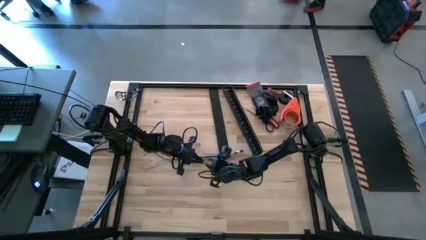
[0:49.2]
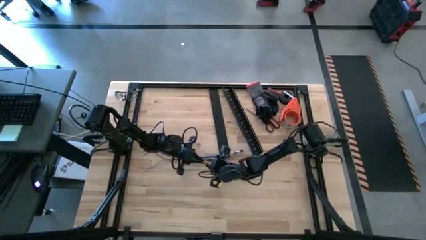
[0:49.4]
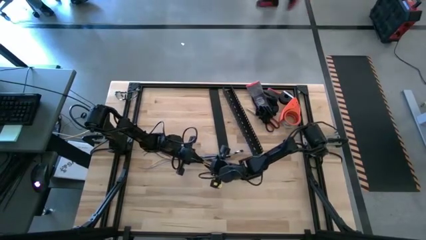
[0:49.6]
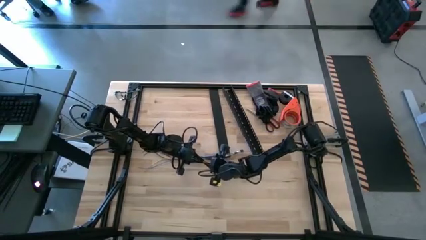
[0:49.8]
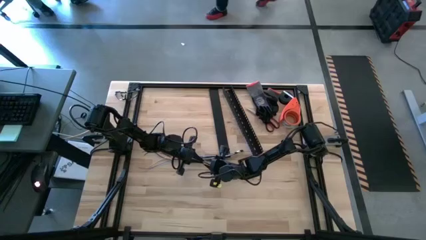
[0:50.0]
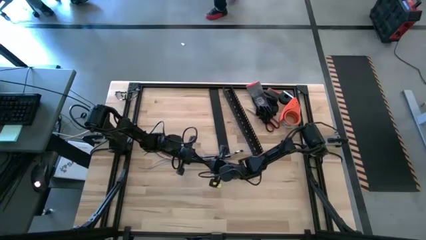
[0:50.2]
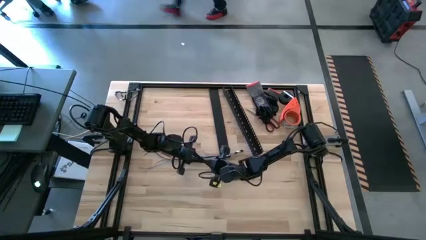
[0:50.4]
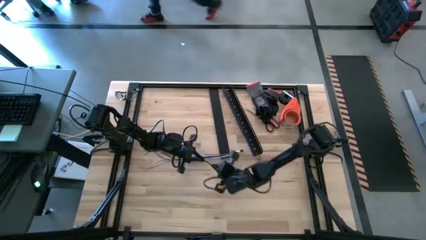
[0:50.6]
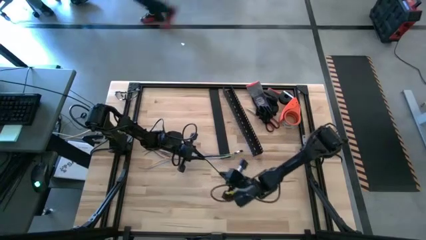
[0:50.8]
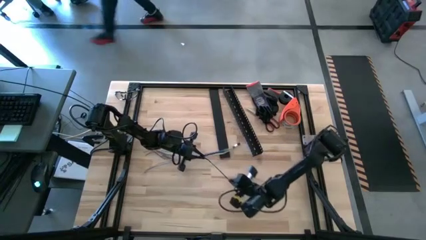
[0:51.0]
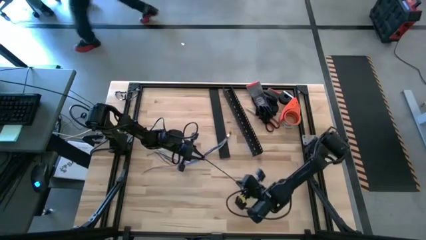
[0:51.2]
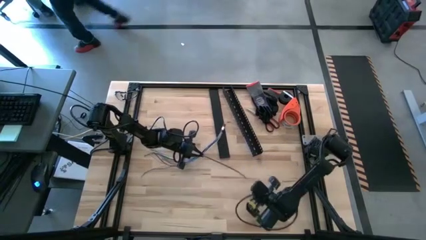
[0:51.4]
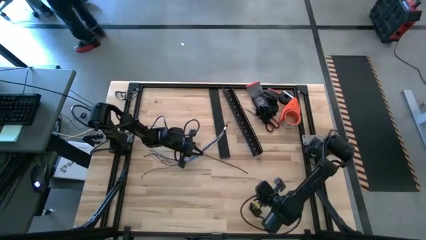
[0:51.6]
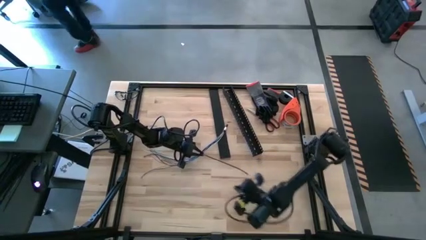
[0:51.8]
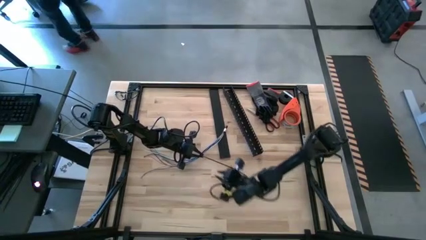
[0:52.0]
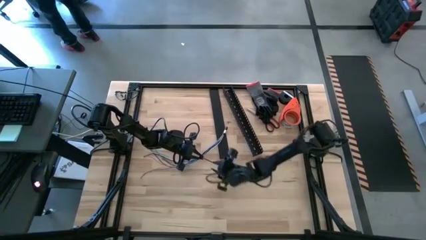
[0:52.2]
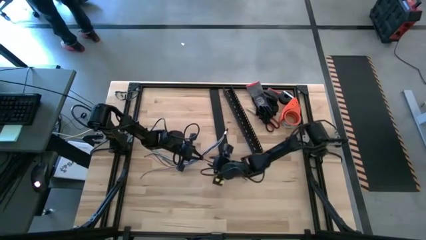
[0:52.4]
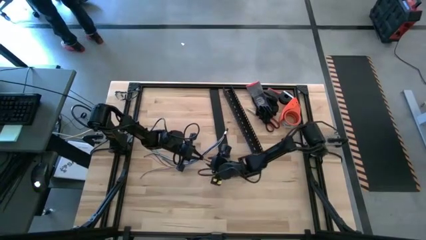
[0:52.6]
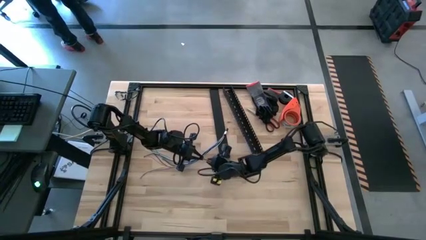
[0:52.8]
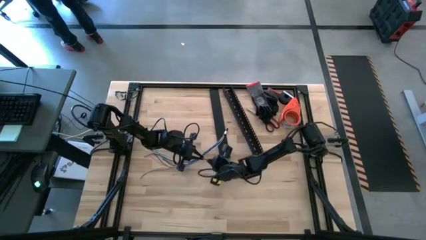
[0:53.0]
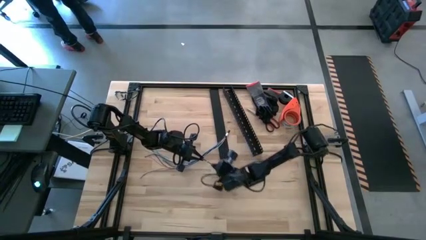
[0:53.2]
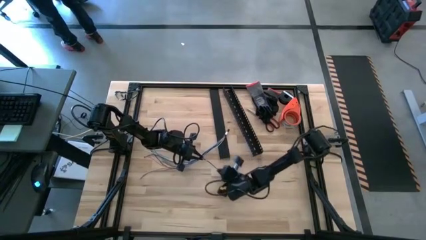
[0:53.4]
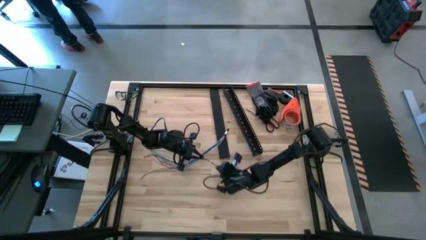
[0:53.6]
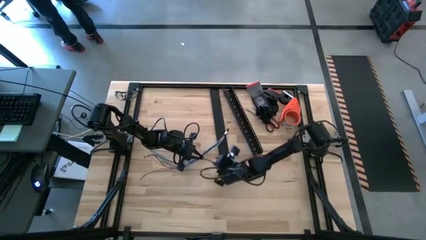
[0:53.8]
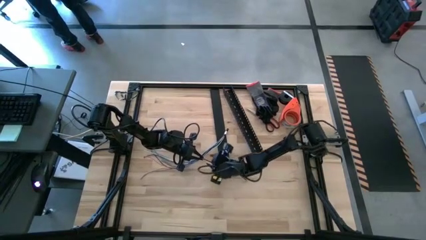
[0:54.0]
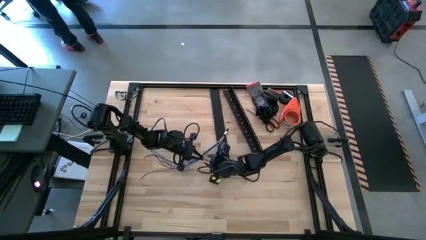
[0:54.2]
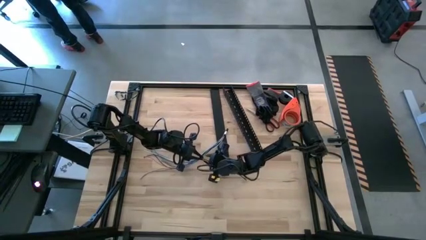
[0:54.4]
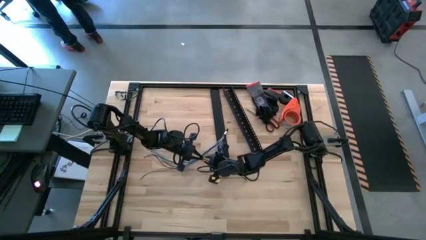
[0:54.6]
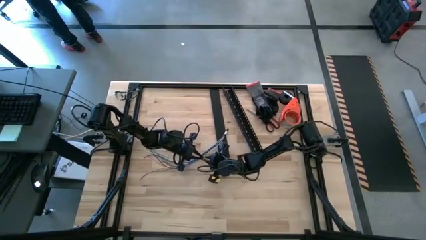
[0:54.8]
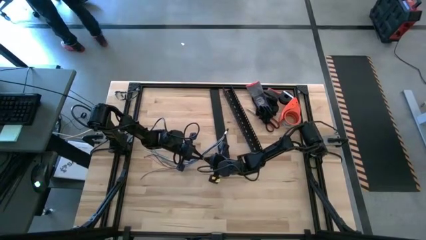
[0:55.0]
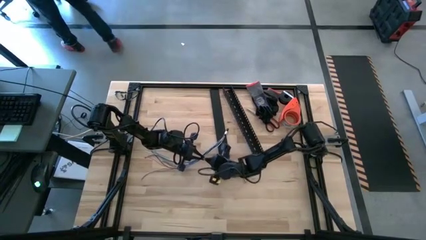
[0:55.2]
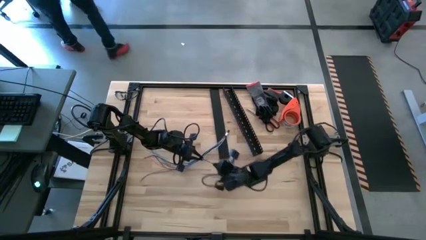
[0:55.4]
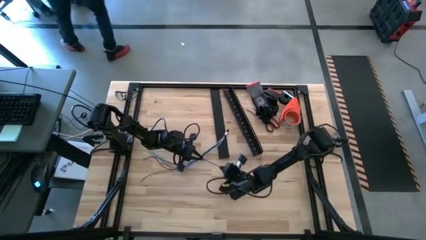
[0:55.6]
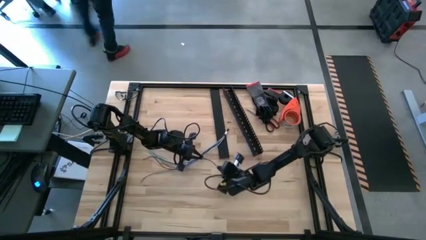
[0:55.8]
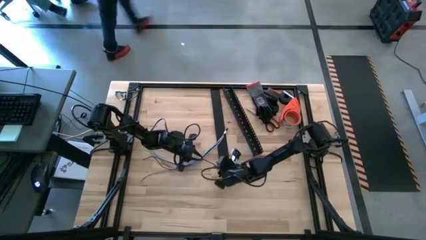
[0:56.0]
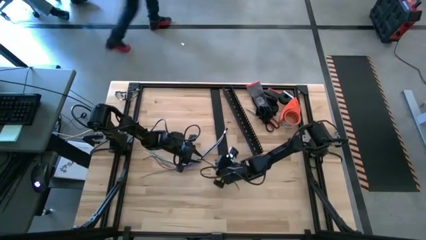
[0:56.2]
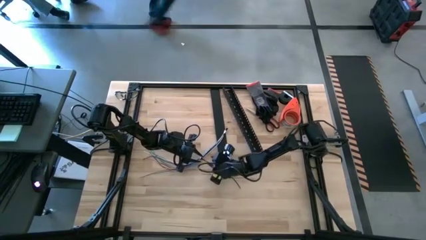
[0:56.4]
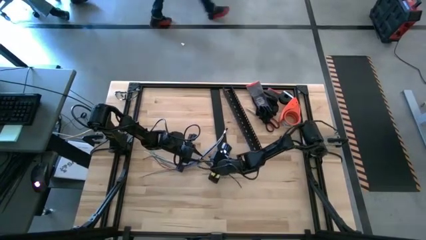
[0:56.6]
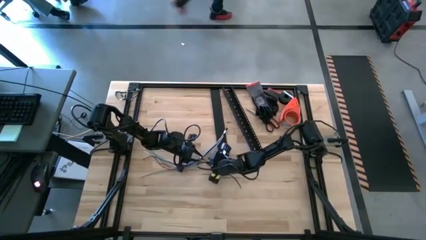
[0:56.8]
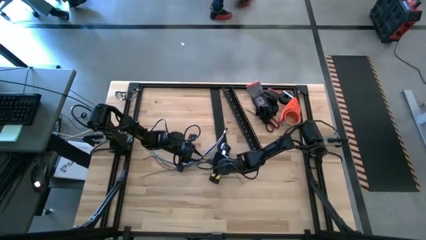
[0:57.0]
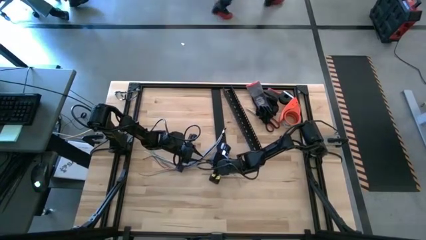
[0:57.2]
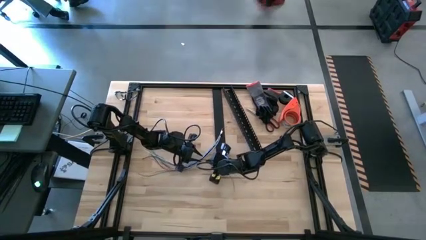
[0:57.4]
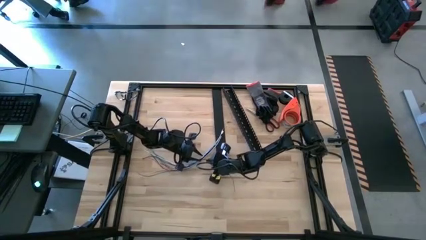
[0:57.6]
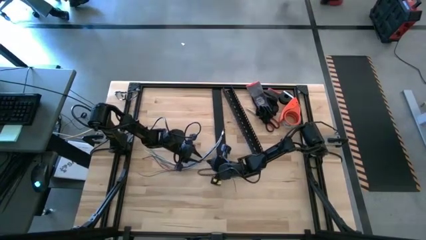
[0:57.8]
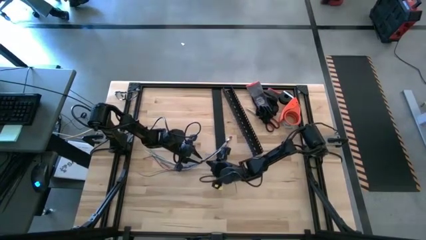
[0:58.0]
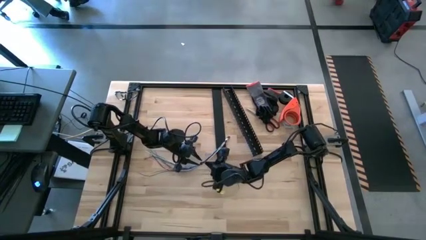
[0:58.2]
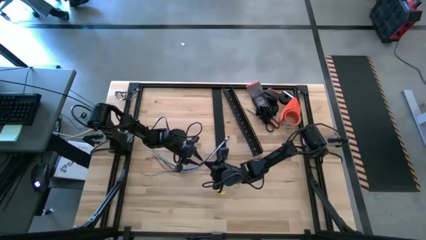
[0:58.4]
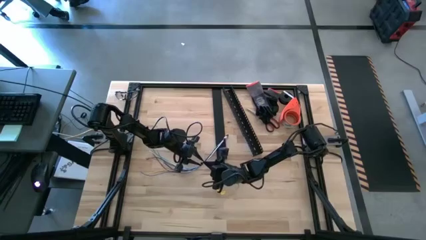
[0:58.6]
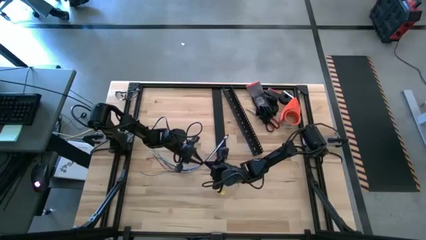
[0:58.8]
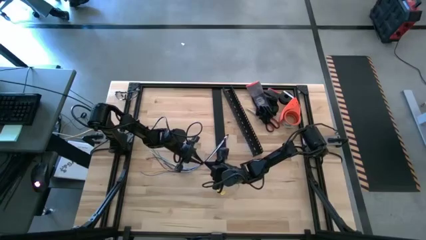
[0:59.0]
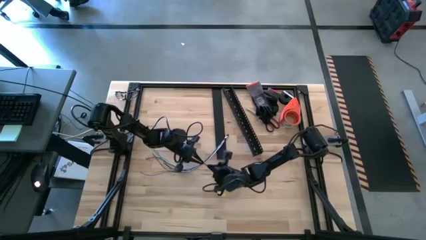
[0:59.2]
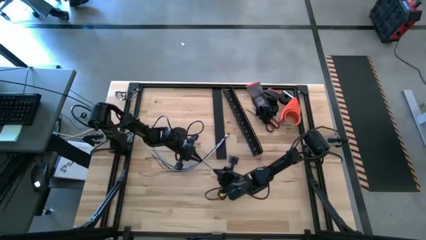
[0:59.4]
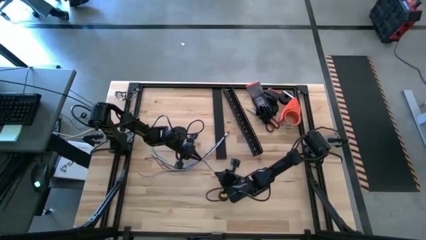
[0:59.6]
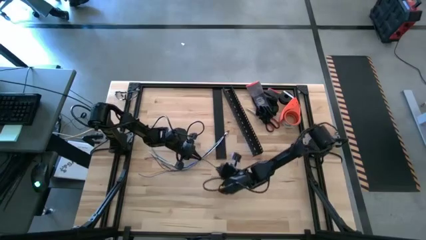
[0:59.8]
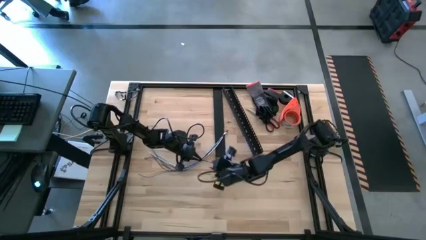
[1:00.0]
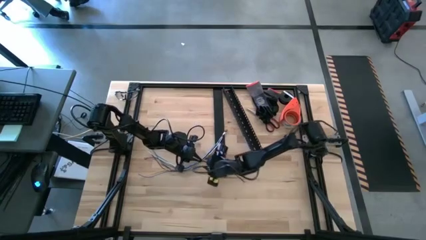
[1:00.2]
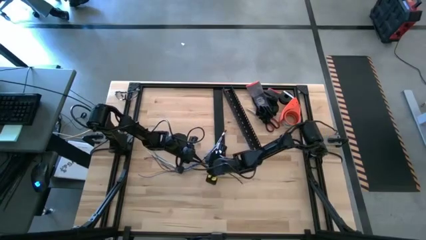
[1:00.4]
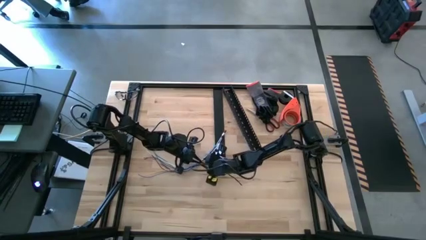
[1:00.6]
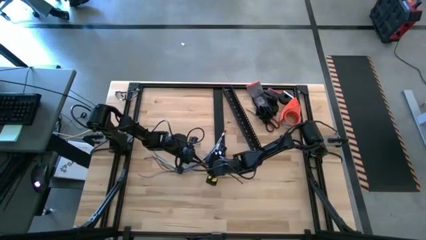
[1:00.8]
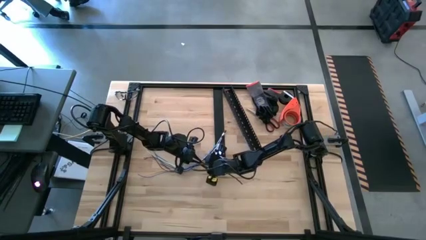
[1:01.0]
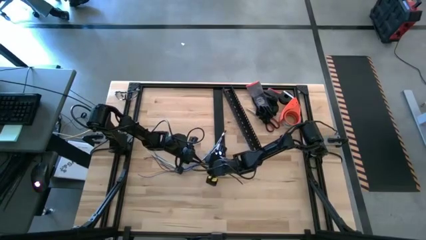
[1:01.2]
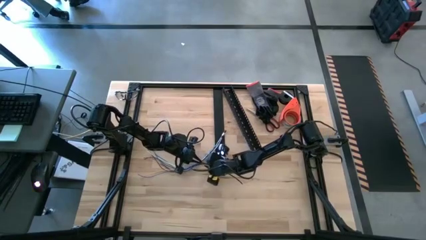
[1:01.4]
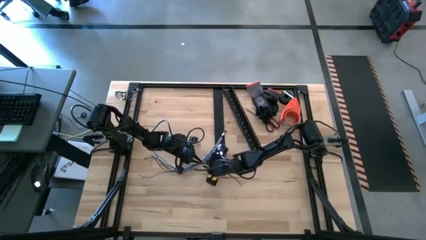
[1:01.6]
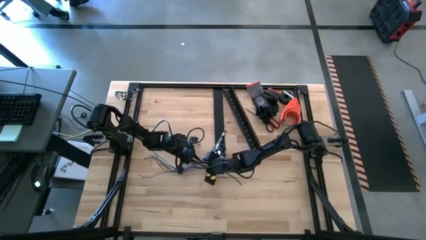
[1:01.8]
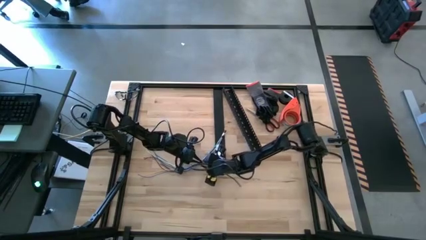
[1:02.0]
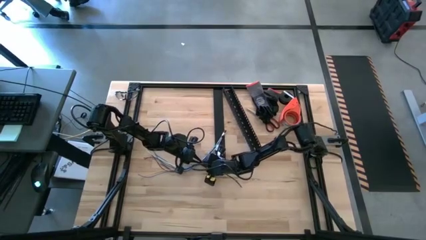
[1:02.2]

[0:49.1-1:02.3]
Task: Ziptie cables
Wrap the black zip tie around the cable wires
